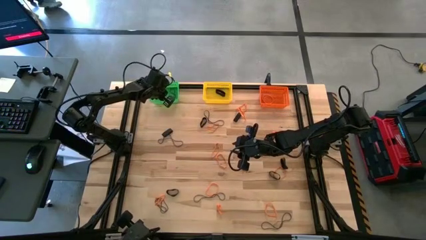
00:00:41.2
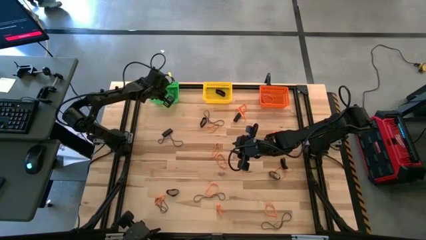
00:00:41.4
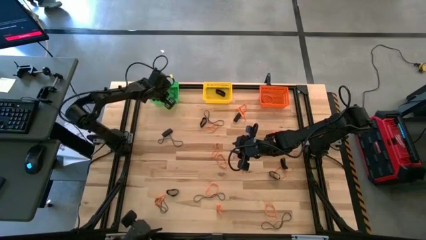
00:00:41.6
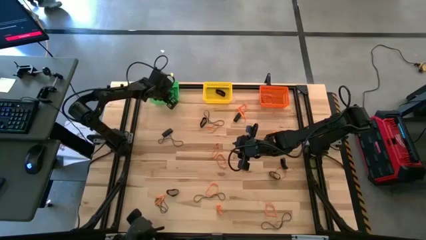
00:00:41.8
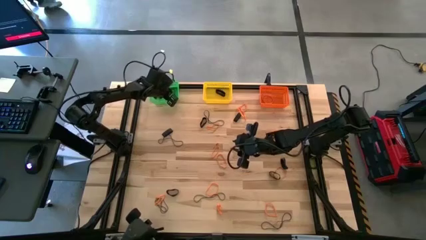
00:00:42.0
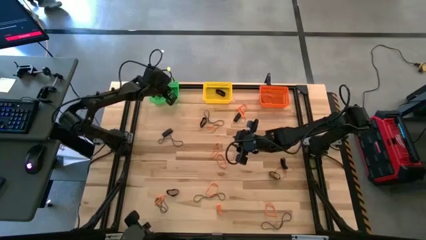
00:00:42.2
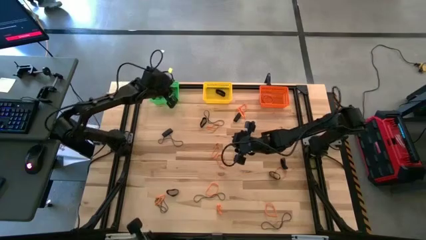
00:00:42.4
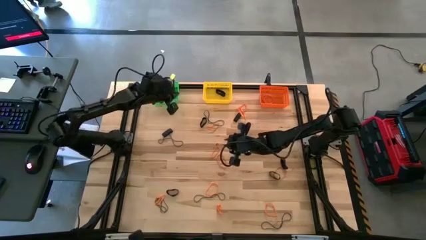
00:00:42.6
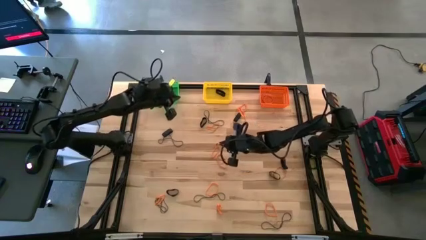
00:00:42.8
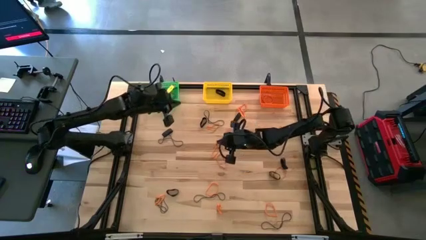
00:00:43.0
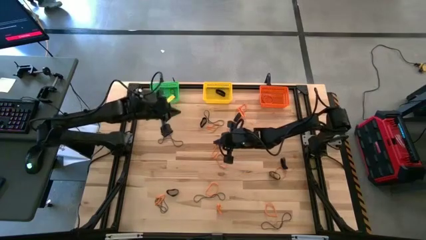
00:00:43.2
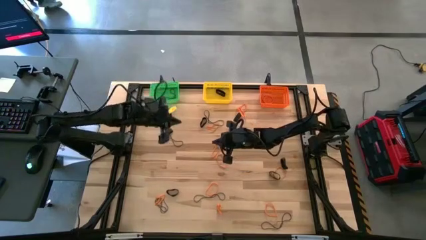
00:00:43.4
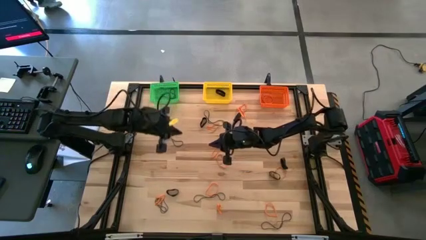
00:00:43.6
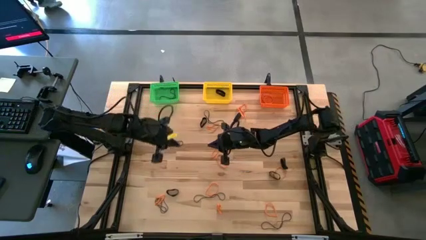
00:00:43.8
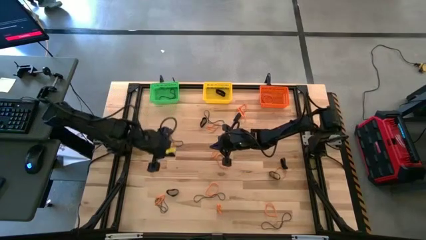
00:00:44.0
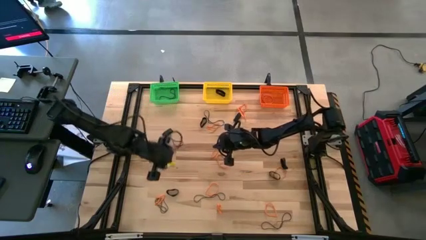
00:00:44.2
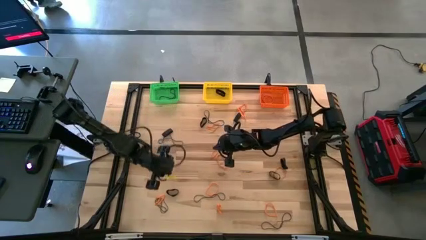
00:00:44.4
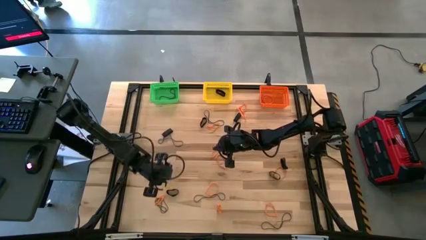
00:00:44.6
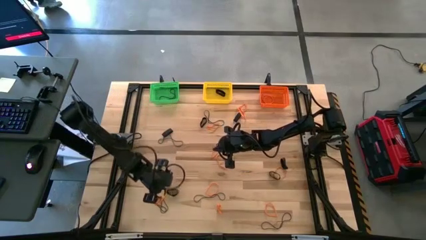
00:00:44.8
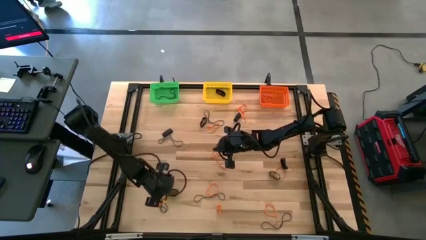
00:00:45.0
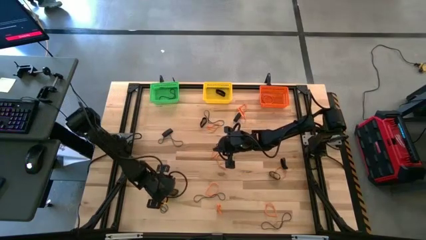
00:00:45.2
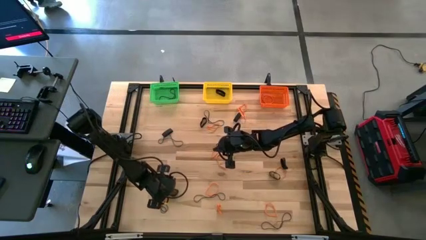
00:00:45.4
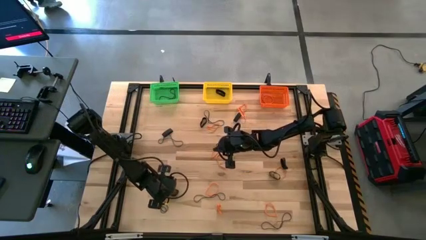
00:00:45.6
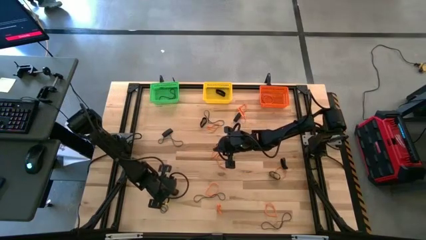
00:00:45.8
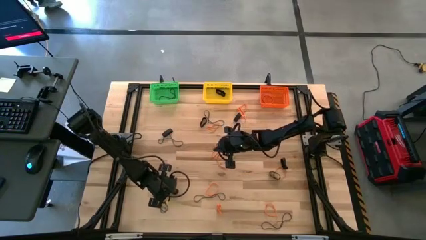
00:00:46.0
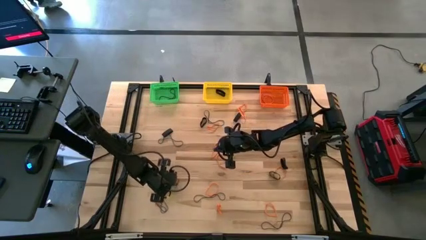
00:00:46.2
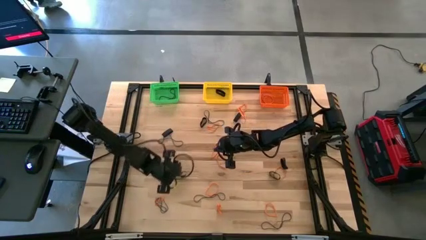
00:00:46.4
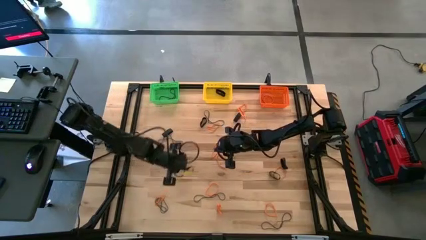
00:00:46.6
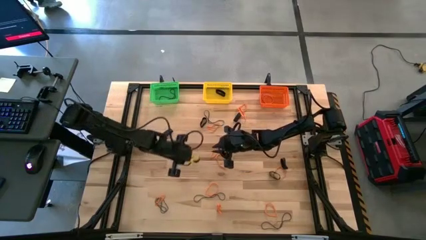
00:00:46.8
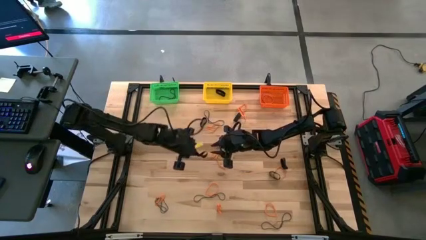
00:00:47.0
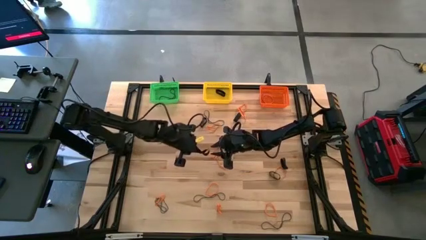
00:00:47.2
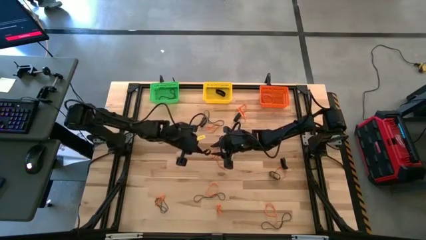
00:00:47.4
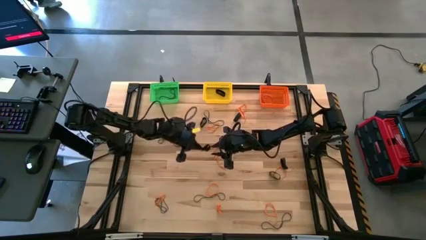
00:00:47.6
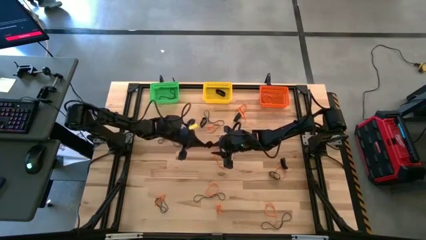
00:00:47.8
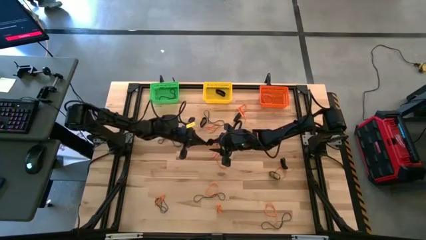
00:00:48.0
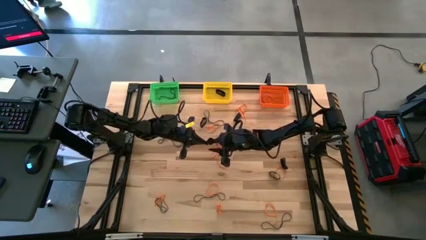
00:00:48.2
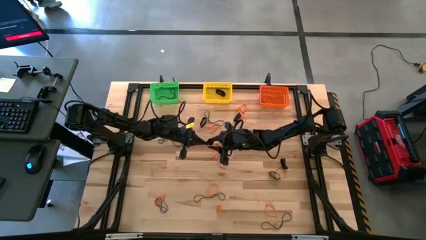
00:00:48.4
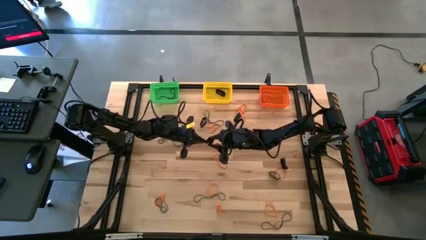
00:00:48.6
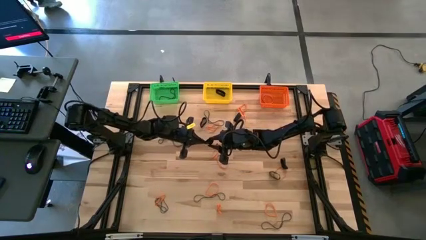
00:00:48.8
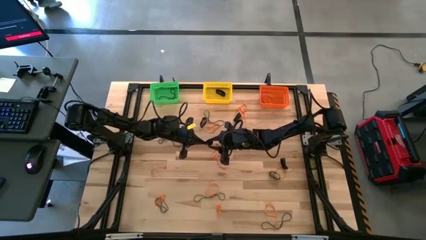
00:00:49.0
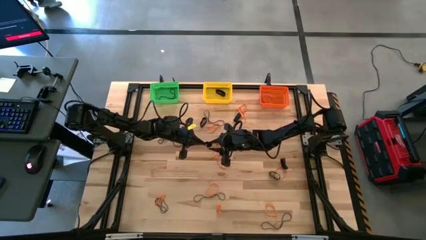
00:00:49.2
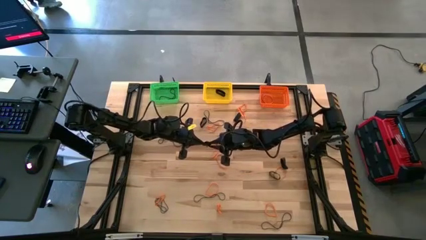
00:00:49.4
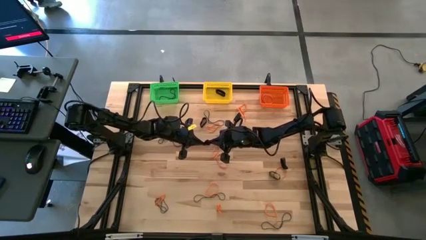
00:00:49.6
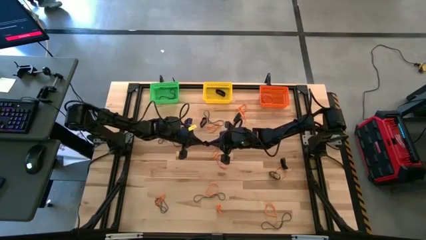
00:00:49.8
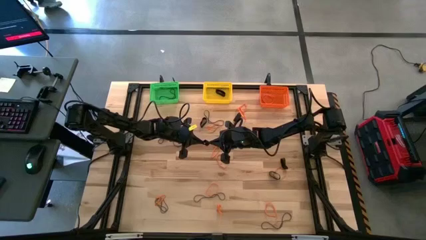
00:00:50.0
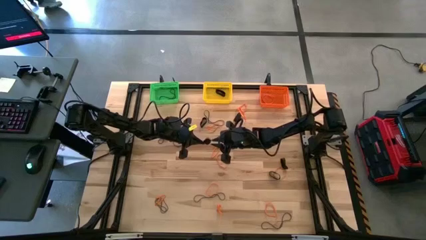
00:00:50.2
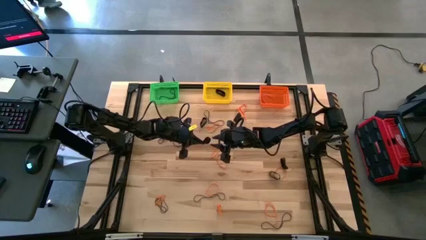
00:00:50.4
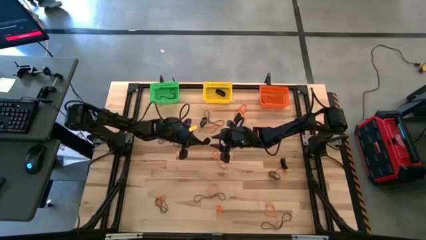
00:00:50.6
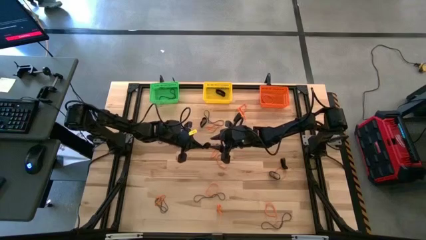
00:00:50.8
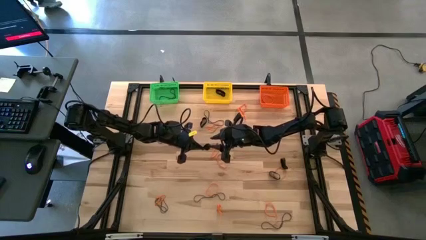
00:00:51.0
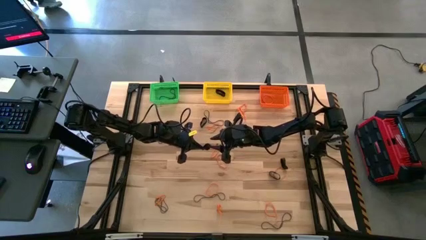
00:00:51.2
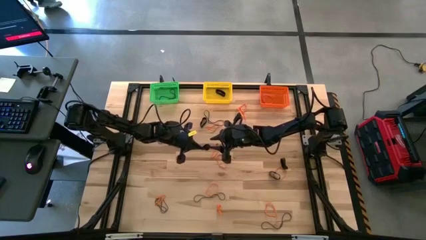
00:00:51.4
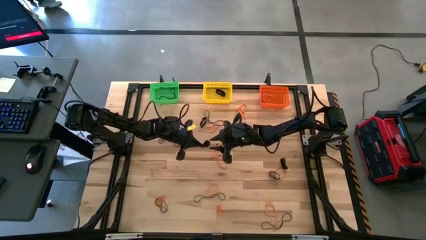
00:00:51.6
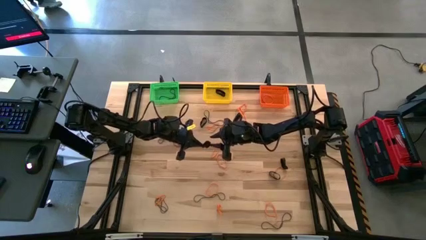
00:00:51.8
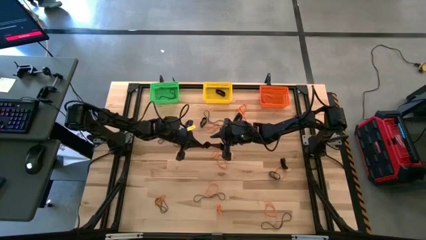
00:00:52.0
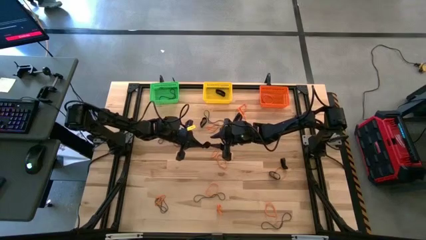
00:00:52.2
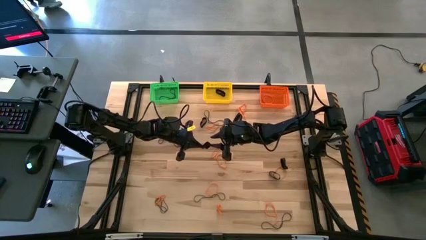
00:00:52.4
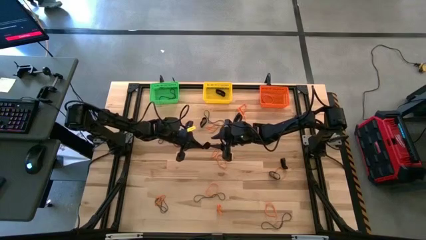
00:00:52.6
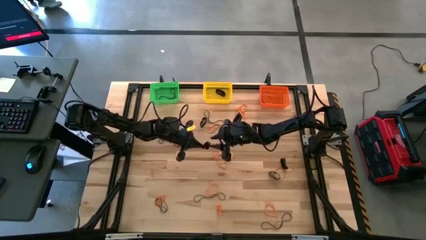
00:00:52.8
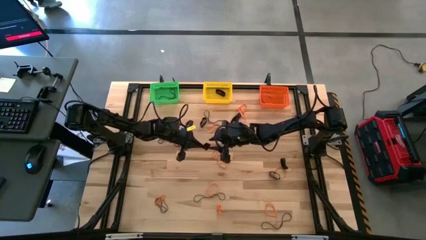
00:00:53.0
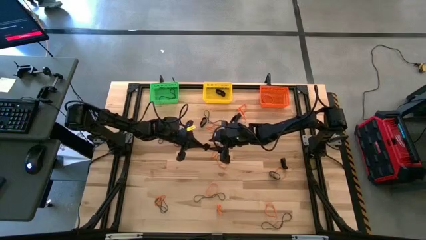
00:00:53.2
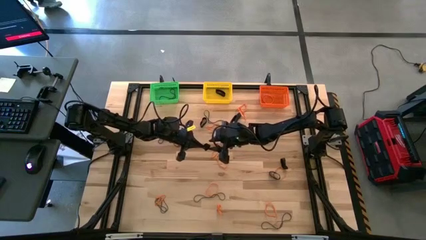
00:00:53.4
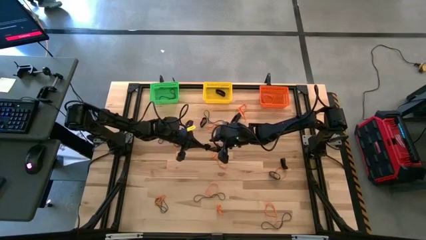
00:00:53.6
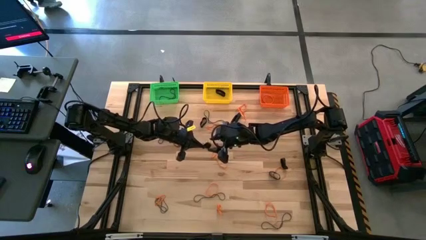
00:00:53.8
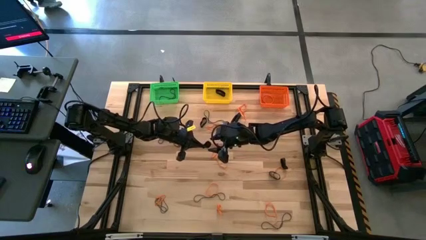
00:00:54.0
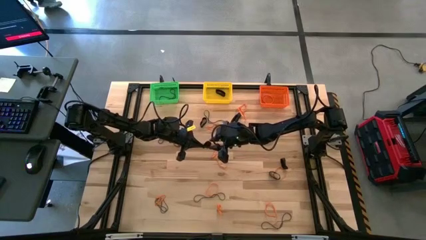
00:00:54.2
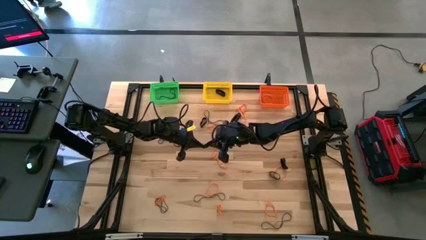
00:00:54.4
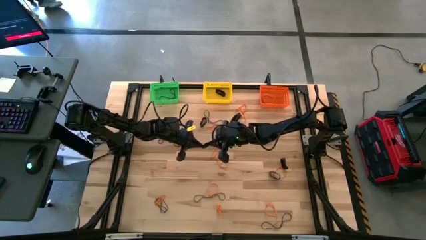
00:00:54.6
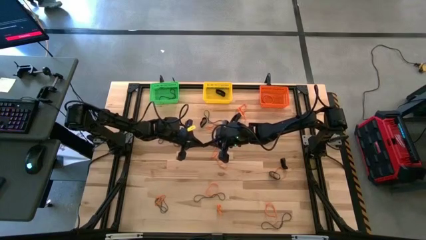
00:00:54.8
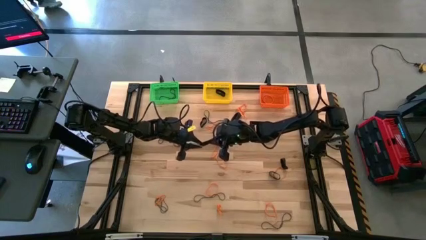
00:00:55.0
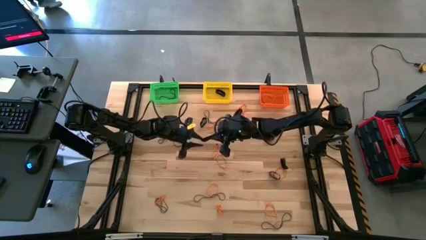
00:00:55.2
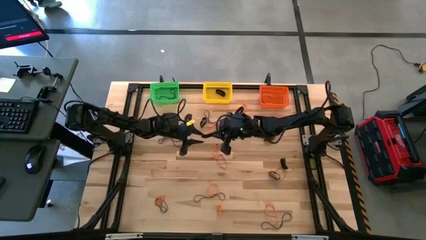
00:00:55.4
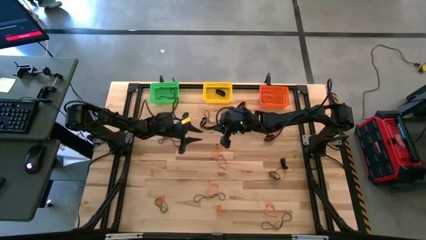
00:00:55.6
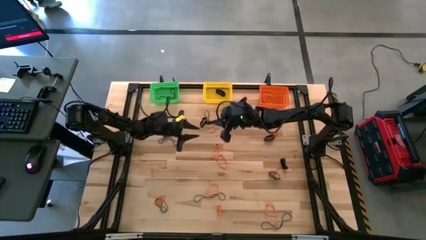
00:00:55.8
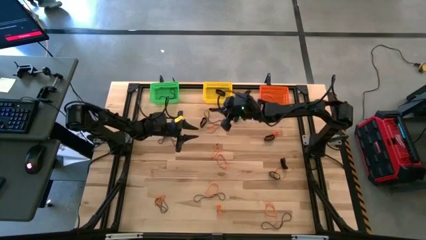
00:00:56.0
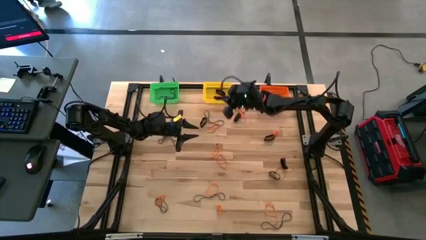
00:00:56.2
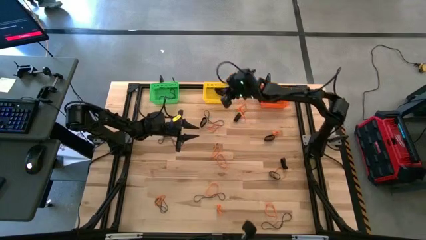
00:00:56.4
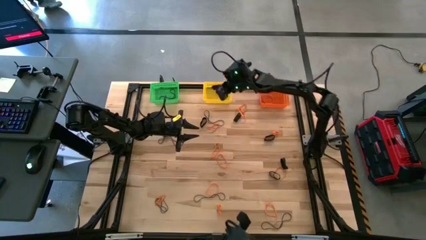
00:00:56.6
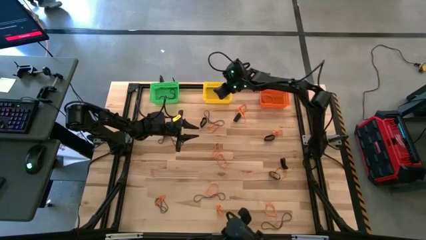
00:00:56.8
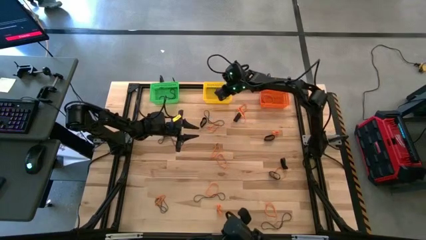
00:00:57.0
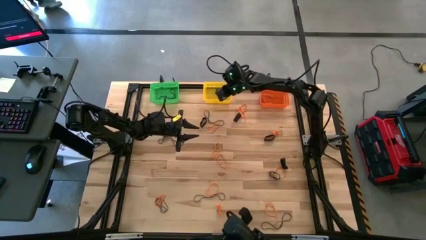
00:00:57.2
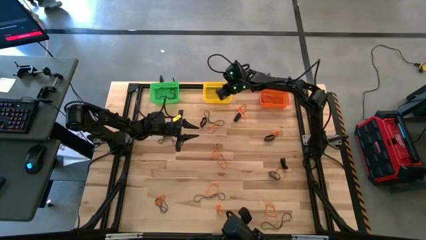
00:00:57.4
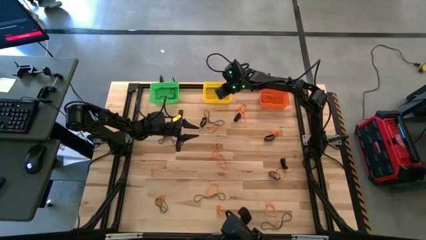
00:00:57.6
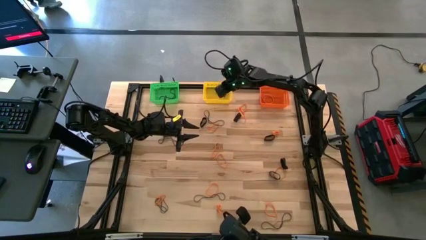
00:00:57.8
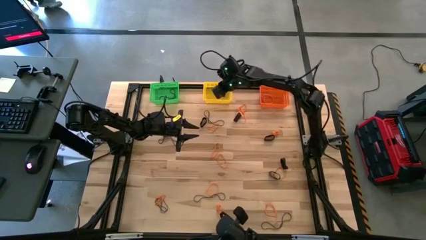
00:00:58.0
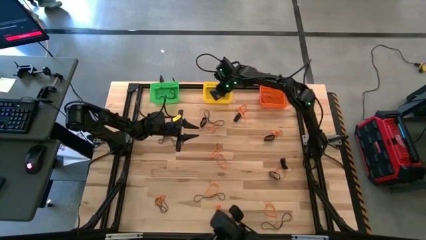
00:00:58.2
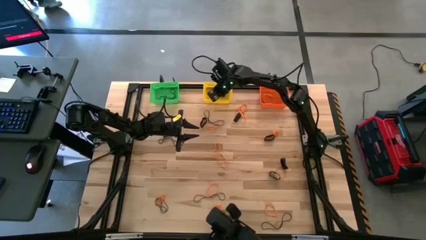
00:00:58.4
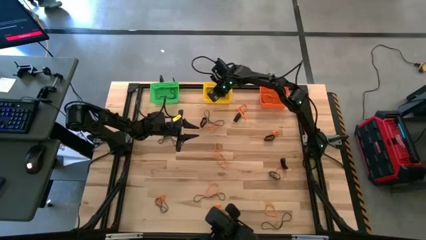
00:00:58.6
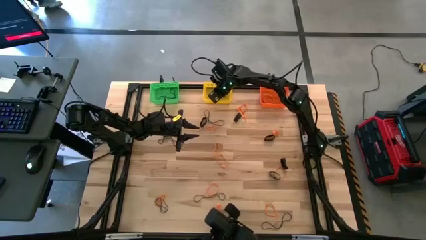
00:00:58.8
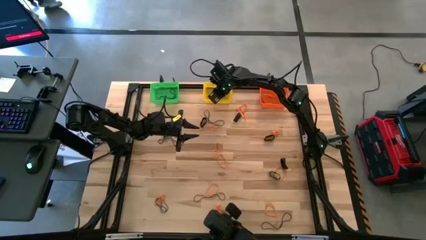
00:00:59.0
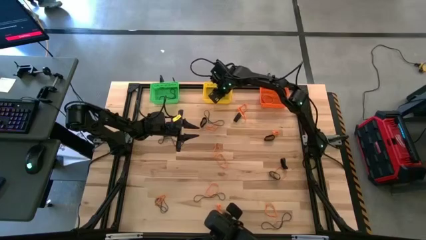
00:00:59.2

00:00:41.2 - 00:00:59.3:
Task: Sort rubber bands into baskets
Put the black rubber band into the yellow bin
